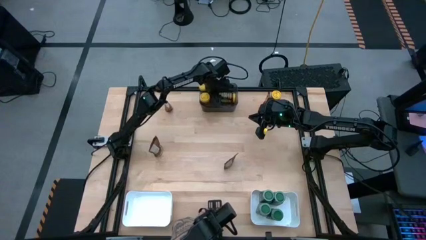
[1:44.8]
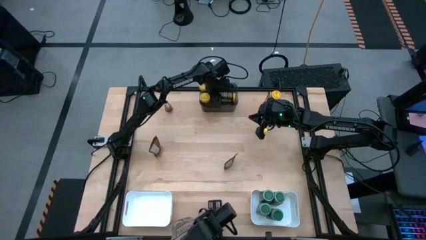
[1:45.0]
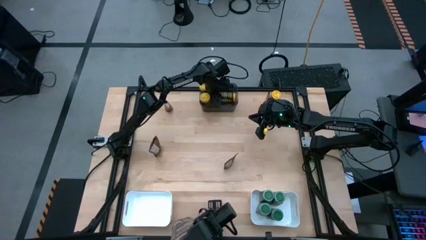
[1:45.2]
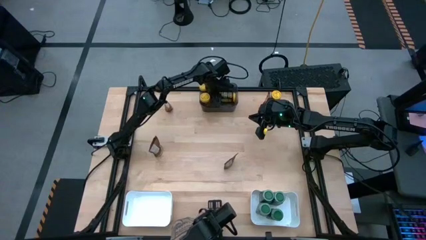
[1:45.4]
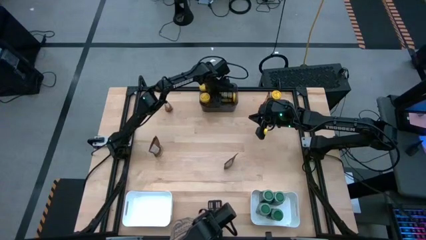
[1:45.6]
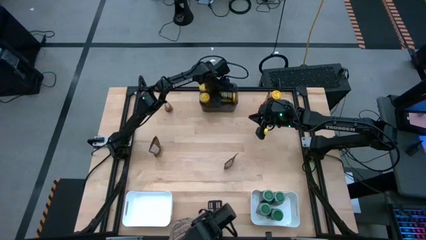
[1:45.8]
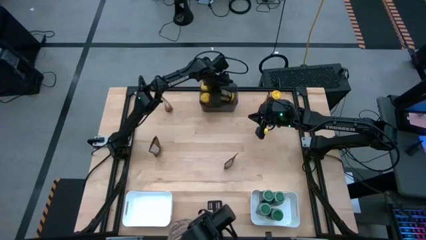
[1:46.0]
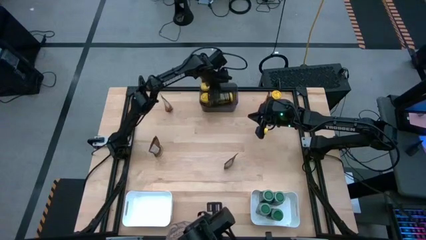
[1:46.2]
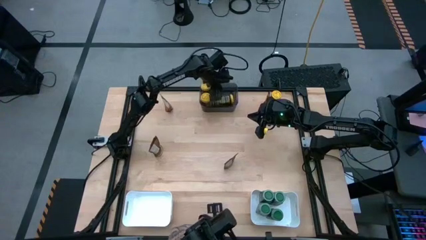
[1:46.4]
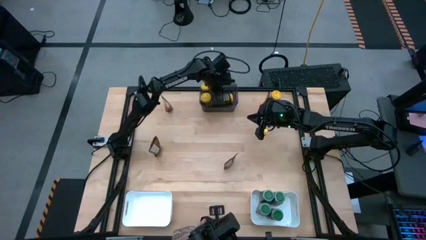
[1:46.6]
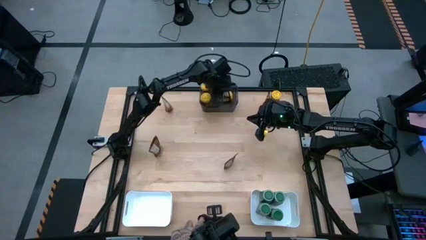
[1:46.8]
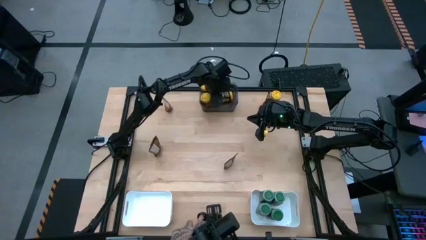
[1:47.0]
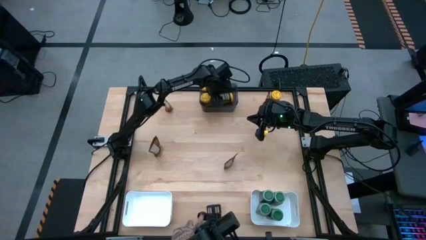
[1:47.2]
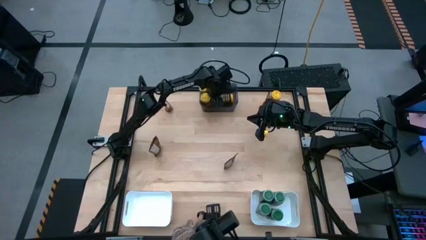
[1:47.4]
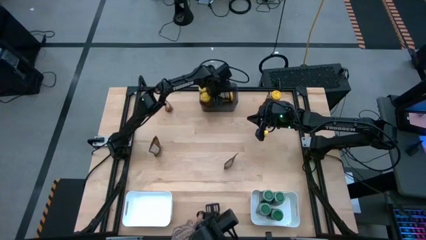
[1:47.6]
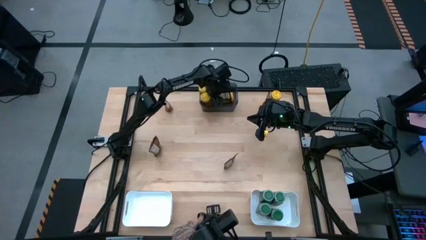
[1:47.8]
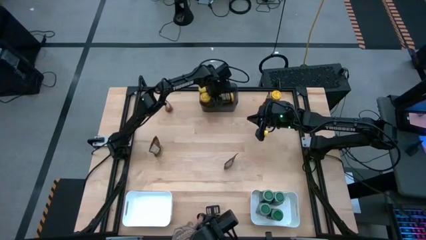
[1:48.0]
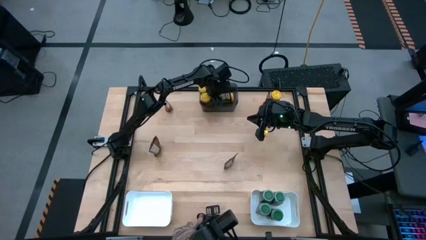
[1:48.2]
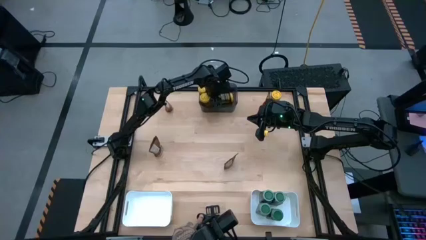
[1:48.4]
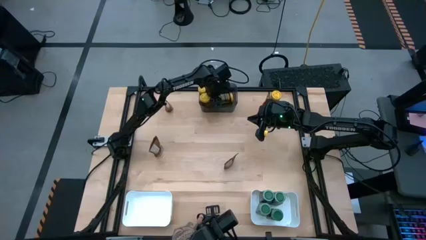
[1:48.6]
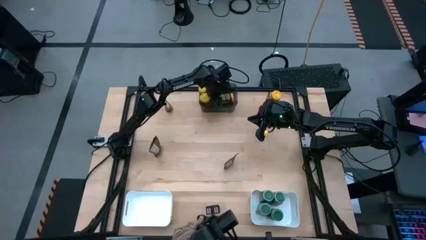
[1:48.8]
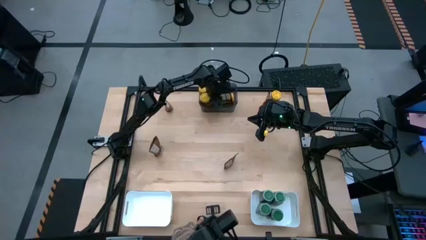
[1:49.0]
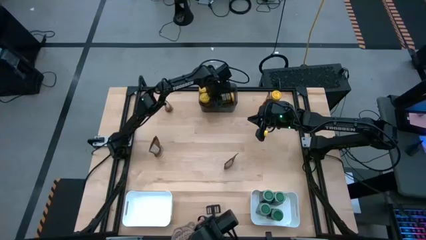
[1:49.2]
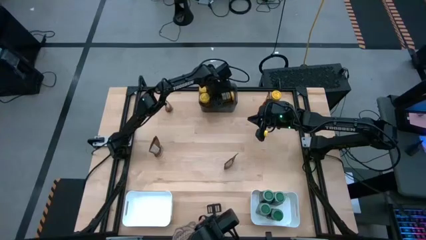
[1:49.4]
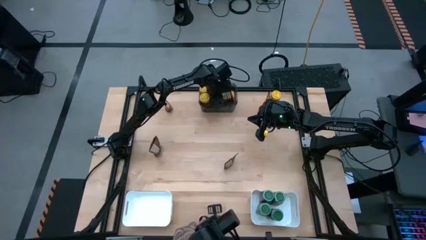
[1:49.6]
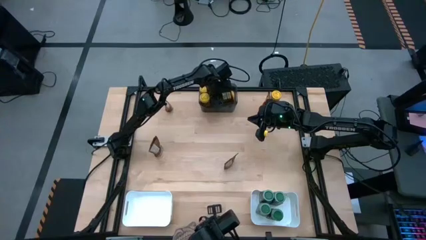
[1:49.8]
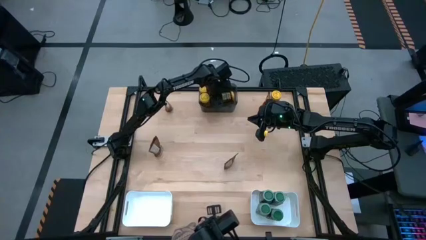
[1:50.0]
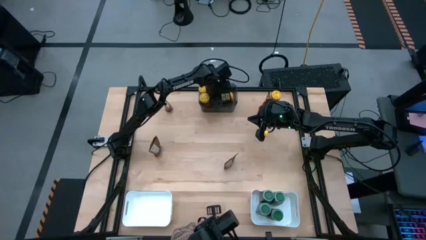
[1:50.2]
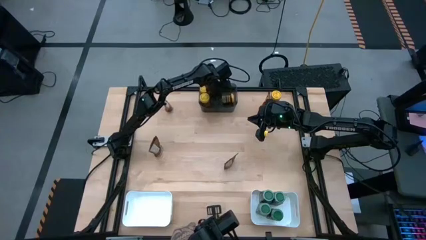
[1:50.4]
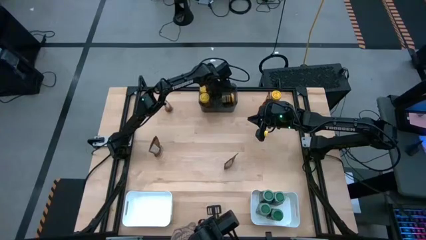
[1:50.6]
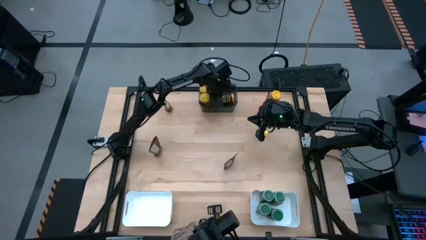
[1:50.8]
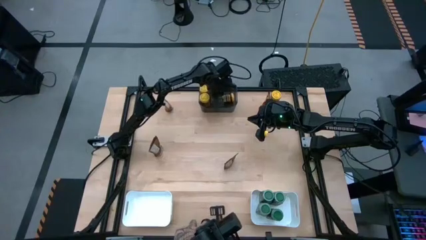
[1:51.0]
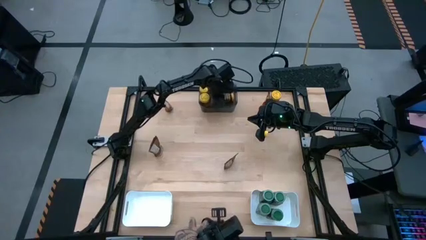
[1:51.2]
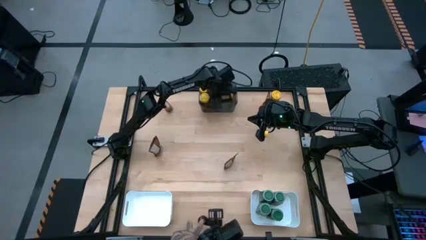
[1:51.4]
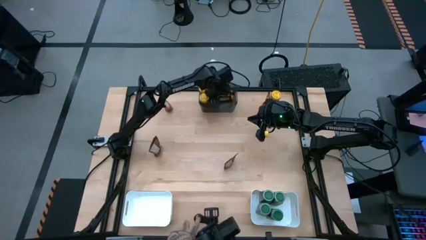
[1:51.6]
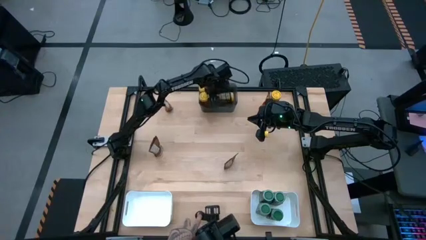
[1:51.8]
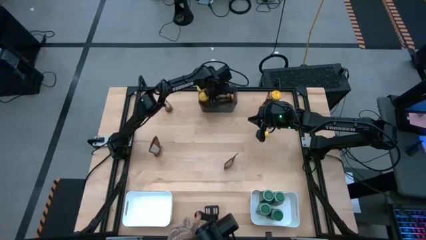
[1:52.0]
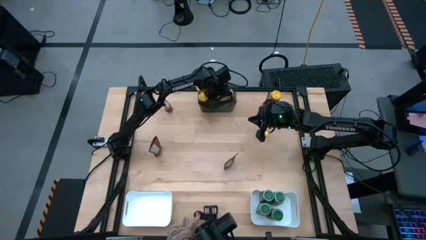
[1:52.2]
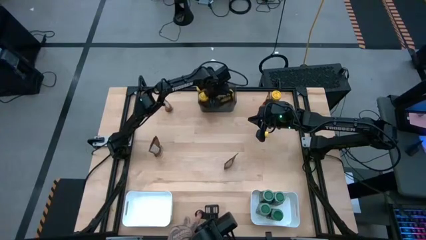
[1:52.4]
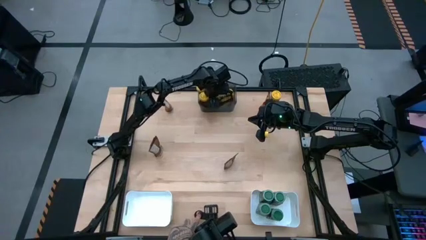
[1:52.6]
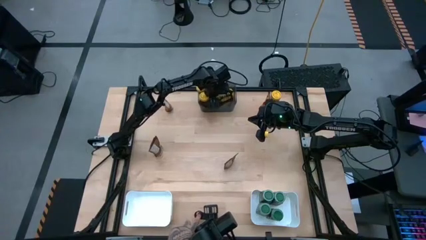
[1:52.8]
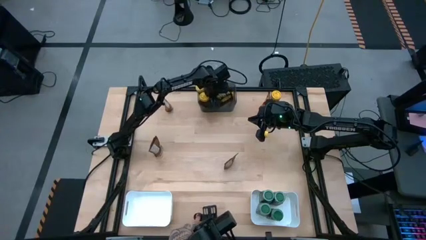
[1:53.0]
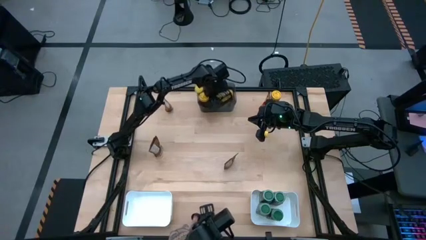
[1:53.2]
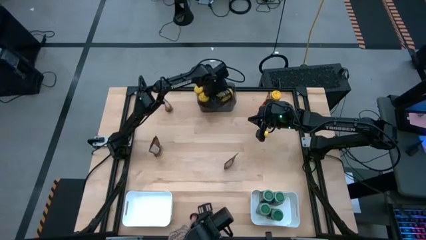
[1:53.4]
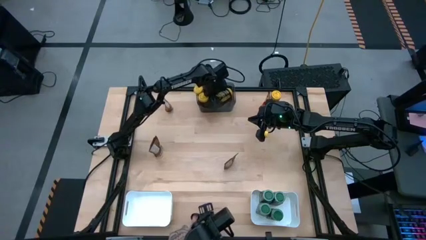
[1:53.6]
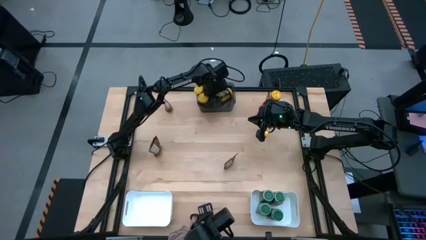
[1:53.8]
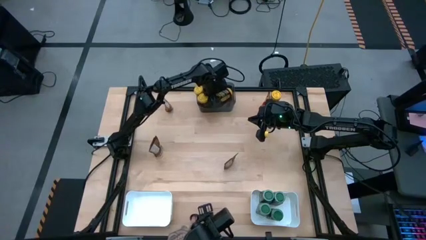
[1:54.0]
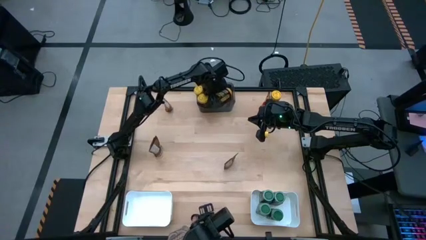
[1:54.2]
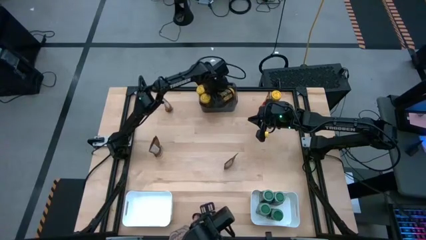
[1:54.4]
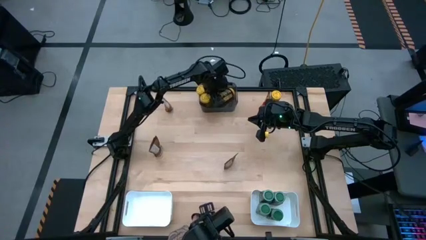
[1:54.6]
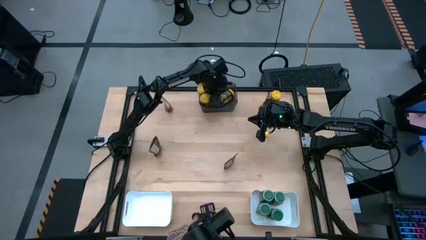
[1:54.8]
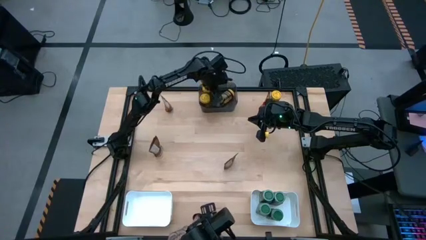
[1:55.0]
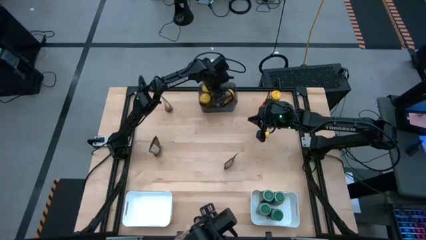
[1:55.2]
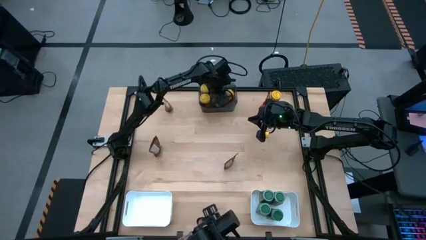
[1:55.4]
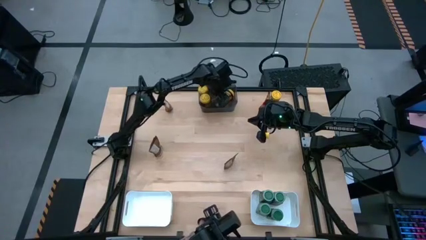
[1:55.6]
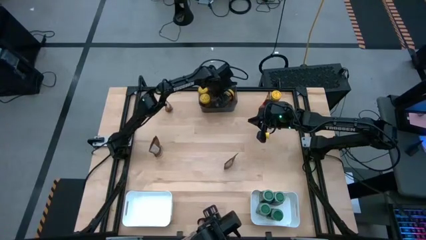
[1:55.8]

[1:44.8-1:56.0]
Task: Sort spices by type
Put the bottom left yellow seasoning bottle into the gray bin

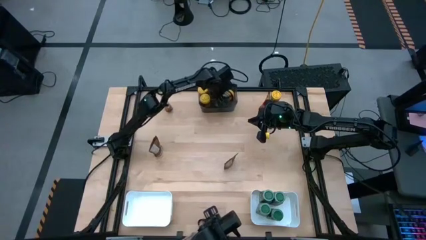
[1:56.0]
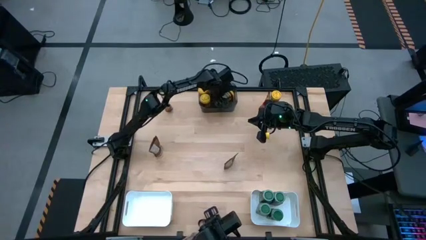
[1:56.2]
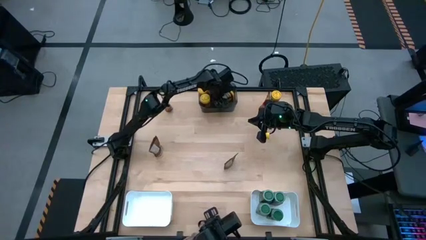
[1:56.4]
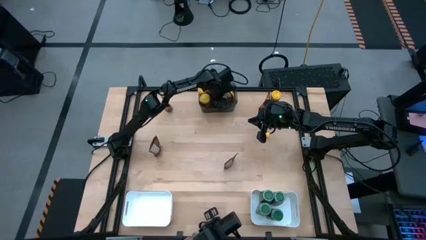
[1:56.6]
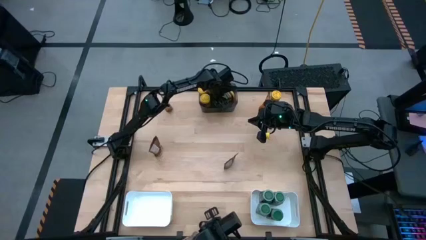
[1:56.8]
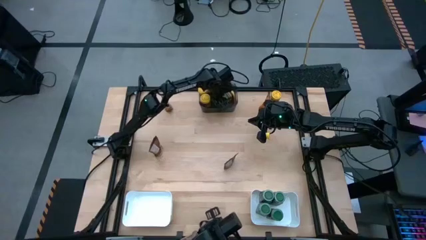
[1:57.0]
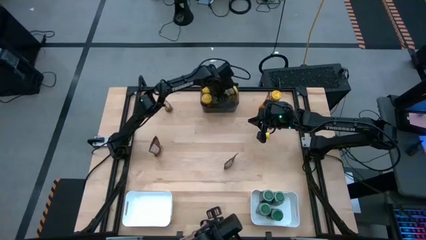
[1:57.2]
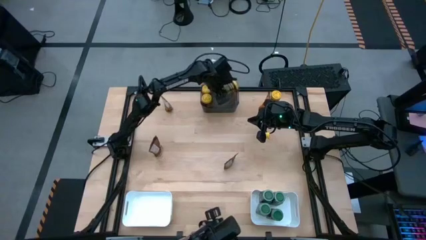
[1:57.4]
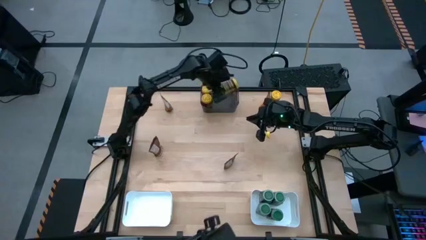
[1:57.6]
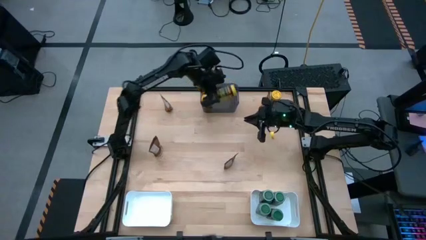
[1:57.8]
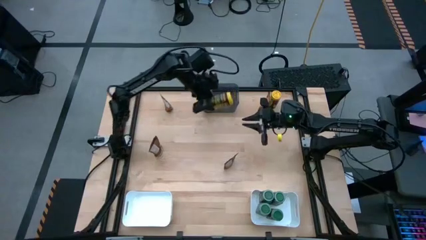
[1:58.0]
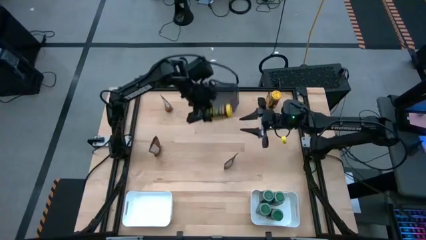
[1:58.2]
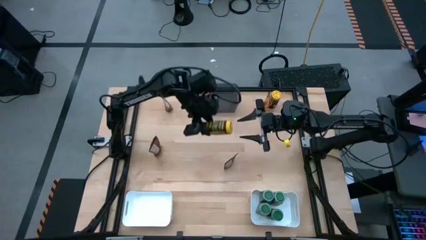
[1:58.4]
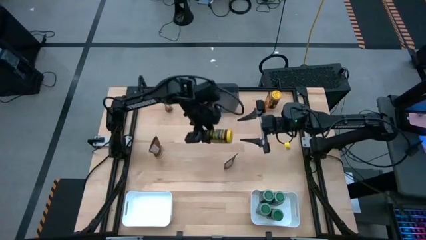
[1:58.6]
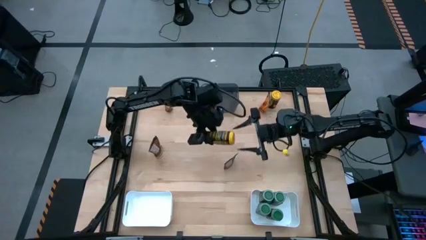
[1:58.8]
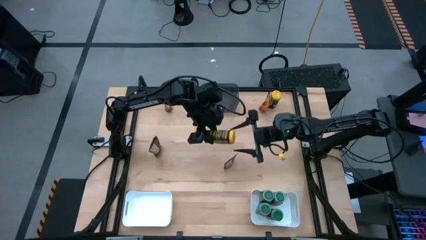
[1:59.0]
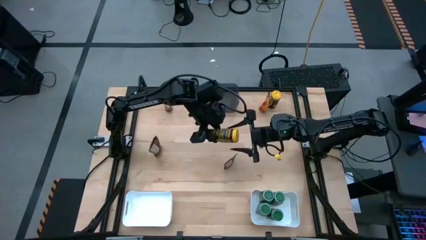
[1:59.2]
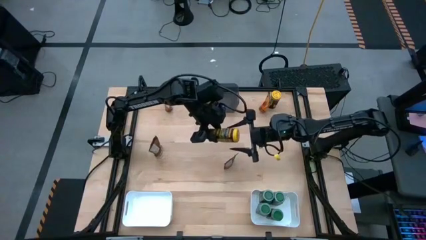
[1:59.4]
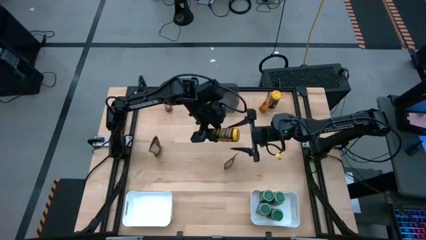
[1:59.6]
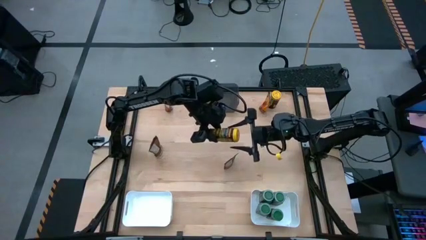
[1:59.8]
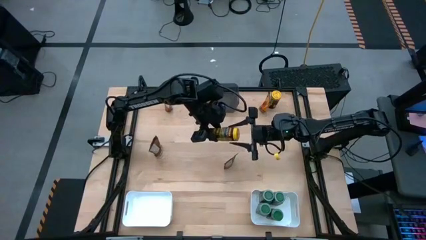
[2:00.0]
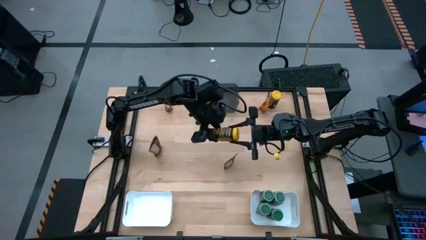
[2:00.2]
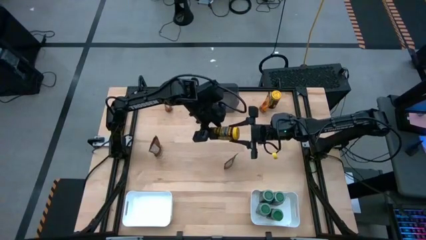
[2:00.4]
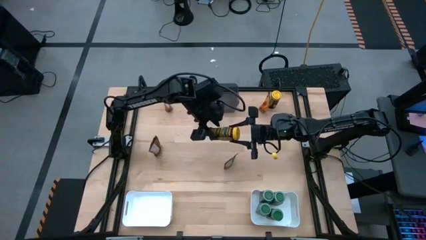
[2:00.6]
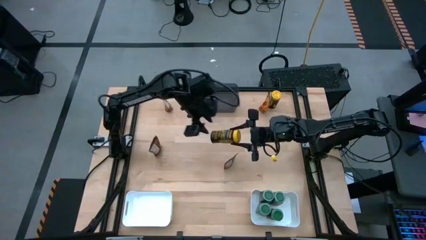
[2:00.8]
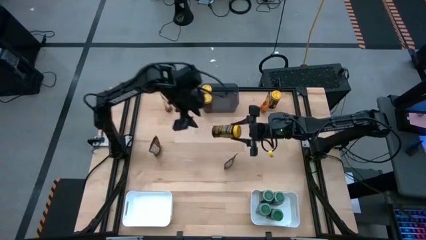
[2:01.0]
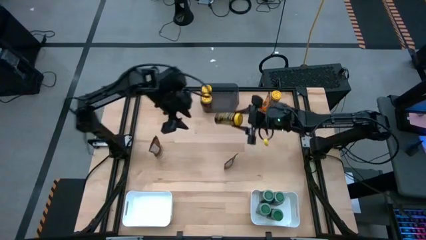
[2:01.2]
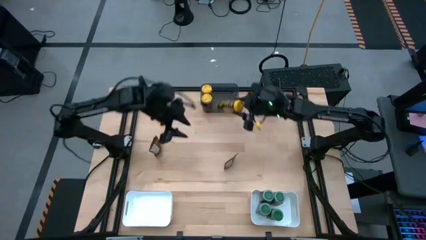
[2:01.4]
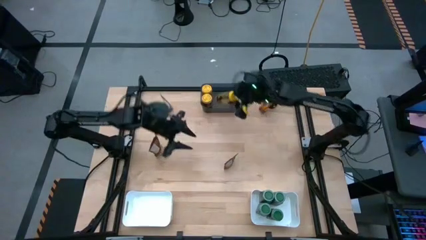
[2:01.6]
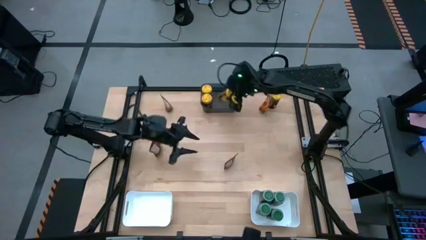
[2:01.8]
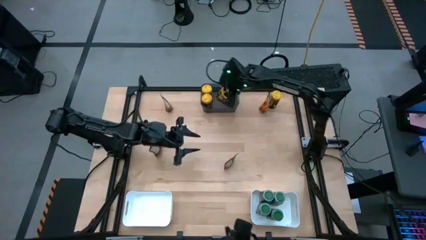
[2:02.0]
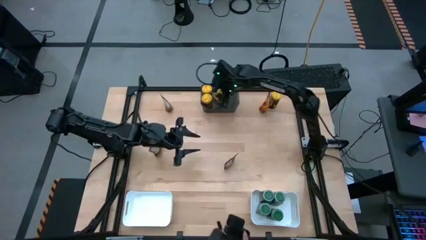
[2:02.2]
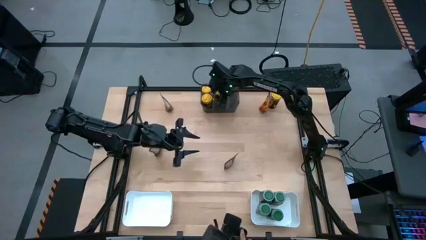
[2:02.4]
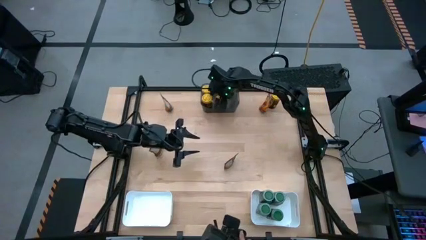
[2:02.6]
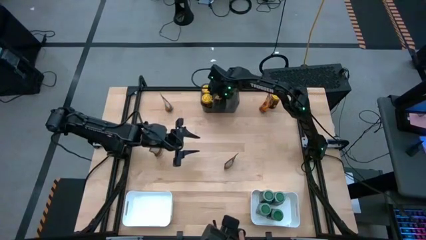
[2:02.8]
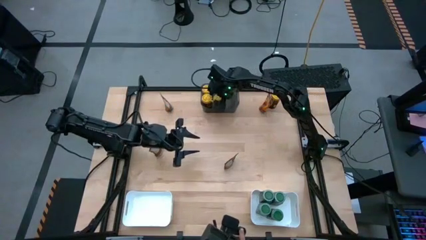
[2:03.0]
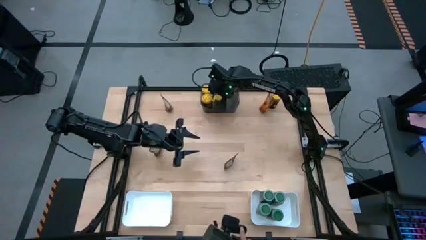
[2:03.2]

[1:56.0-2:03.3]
Put the bottom left yellow seasoning bottle into the gray bin
